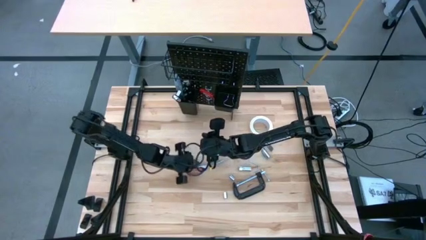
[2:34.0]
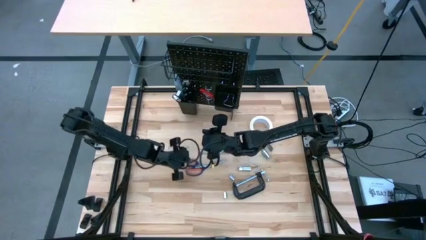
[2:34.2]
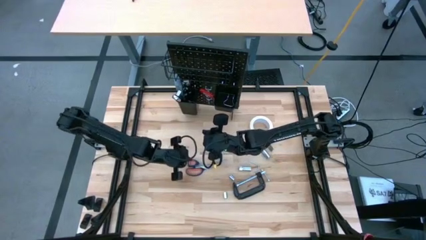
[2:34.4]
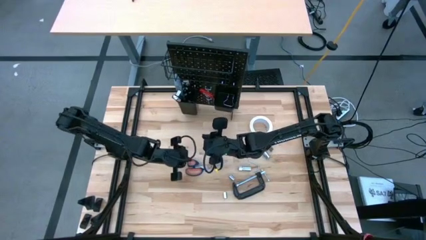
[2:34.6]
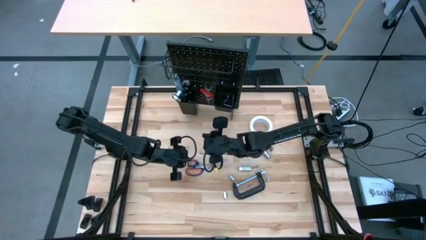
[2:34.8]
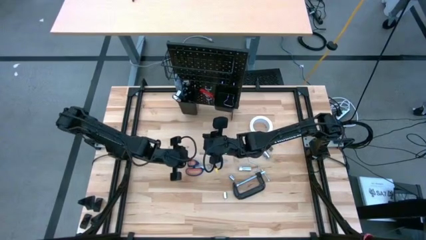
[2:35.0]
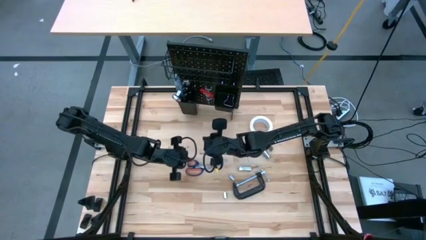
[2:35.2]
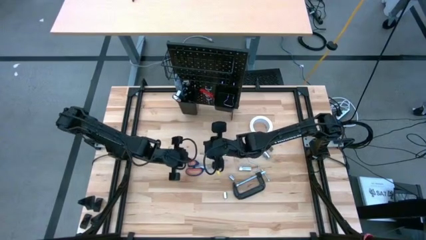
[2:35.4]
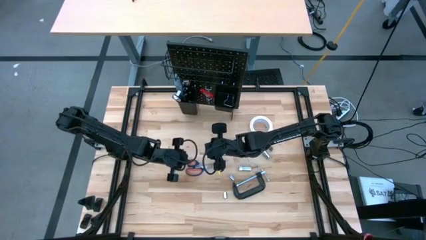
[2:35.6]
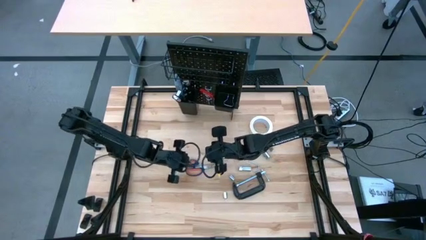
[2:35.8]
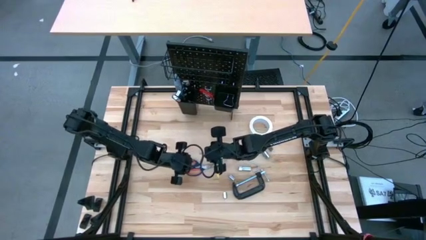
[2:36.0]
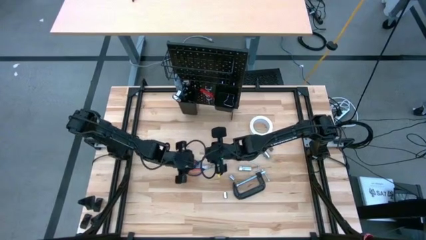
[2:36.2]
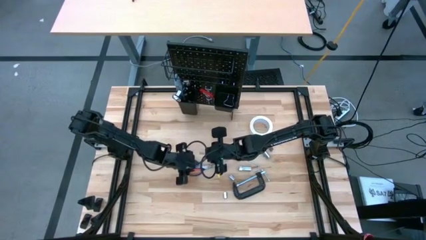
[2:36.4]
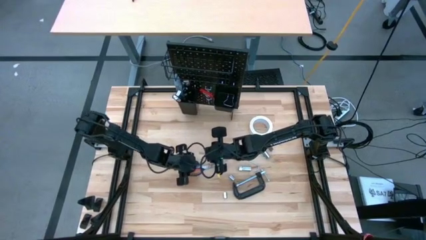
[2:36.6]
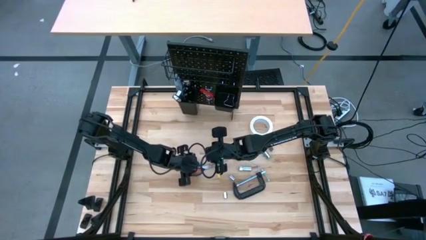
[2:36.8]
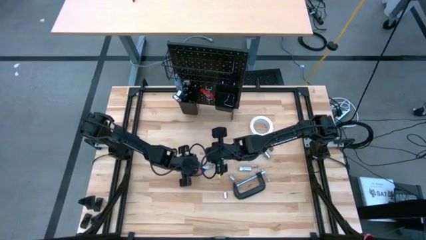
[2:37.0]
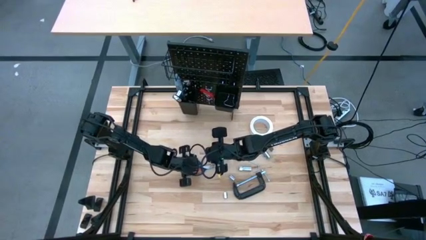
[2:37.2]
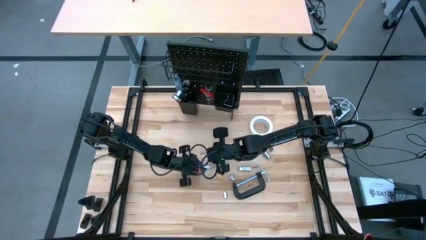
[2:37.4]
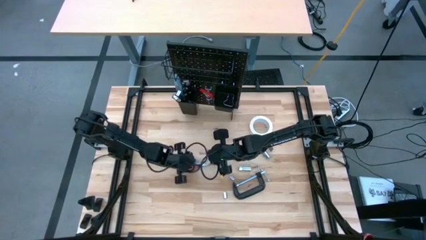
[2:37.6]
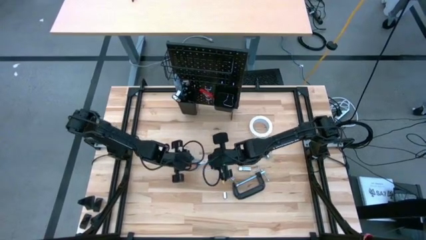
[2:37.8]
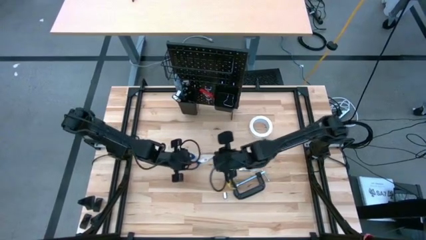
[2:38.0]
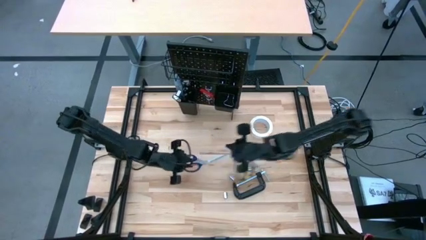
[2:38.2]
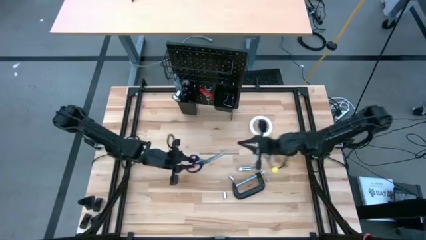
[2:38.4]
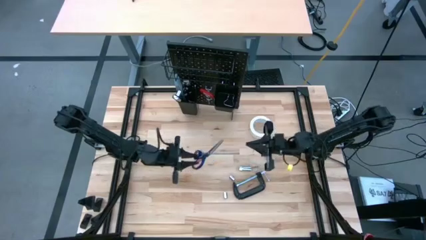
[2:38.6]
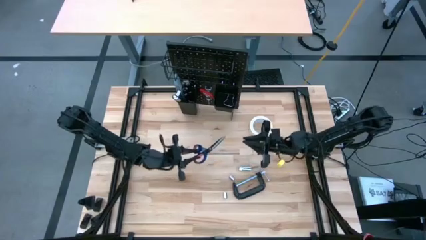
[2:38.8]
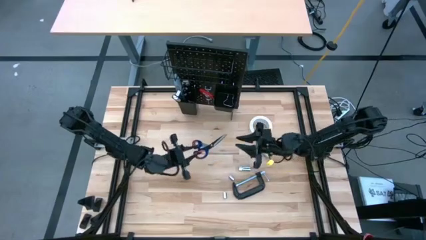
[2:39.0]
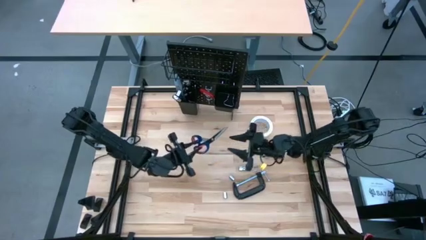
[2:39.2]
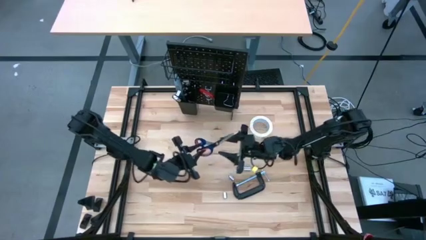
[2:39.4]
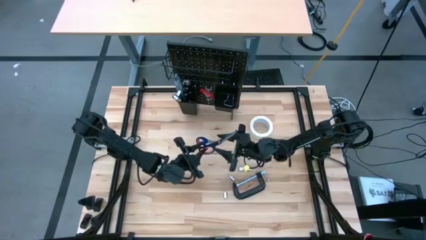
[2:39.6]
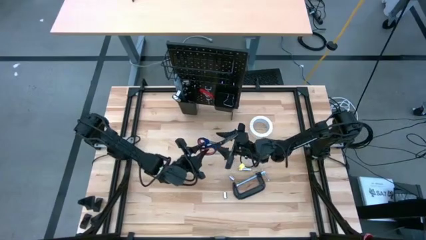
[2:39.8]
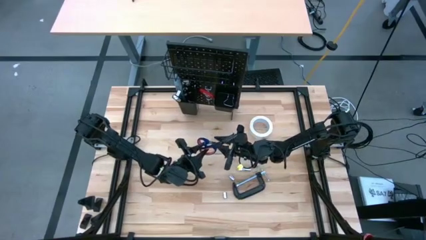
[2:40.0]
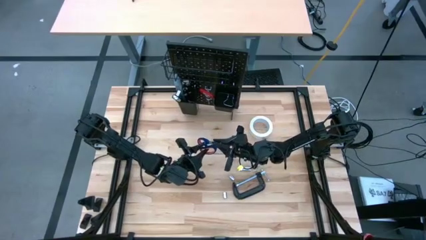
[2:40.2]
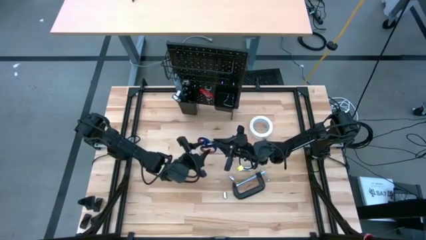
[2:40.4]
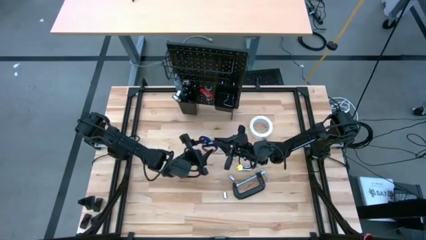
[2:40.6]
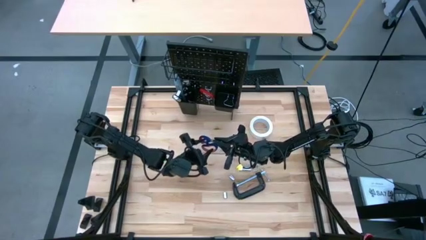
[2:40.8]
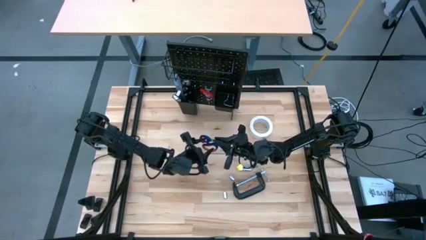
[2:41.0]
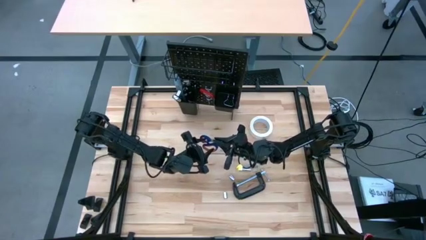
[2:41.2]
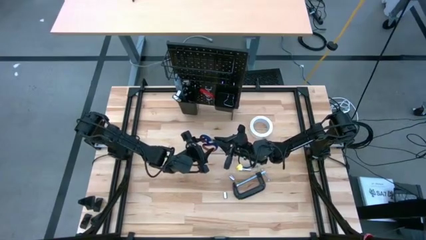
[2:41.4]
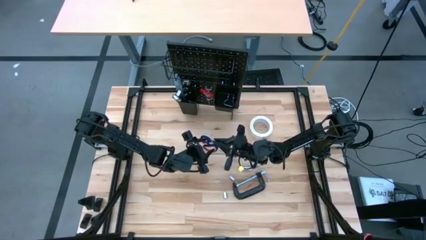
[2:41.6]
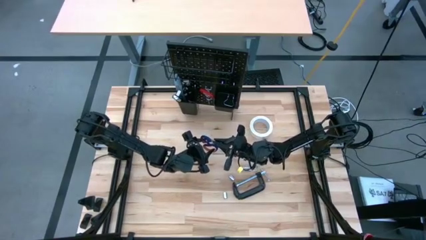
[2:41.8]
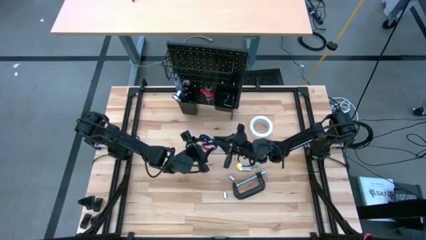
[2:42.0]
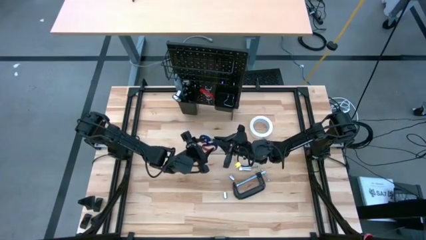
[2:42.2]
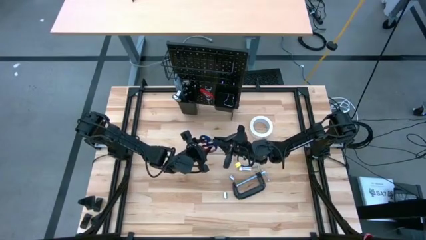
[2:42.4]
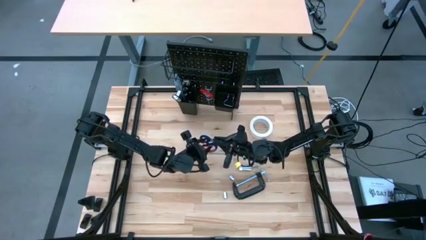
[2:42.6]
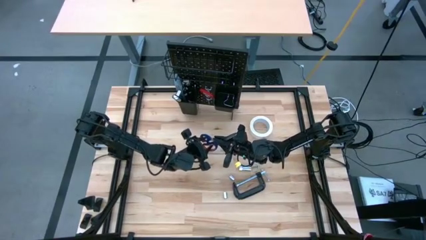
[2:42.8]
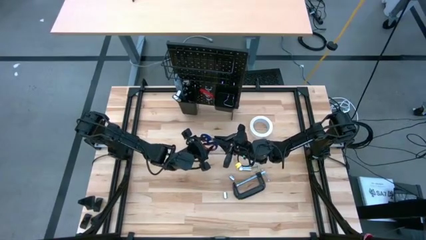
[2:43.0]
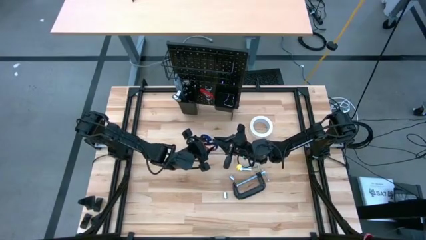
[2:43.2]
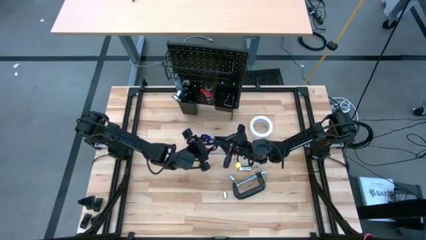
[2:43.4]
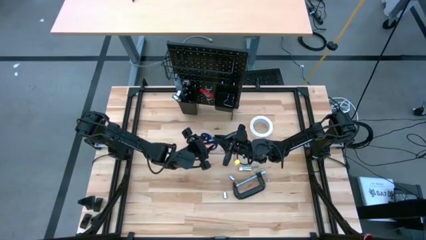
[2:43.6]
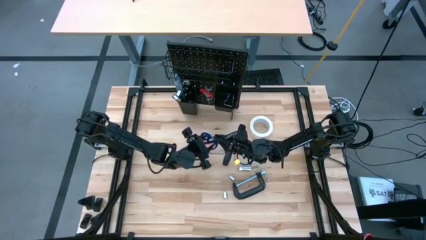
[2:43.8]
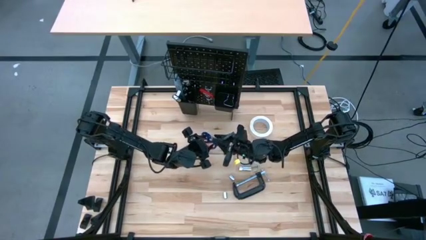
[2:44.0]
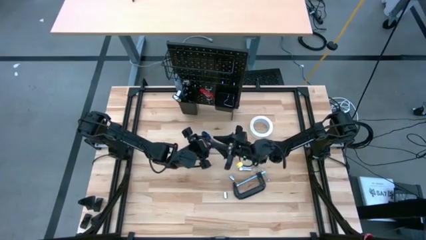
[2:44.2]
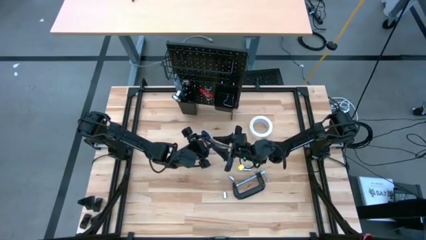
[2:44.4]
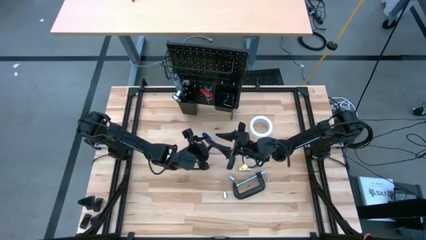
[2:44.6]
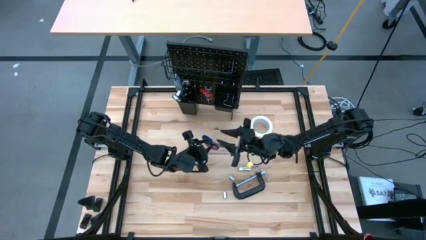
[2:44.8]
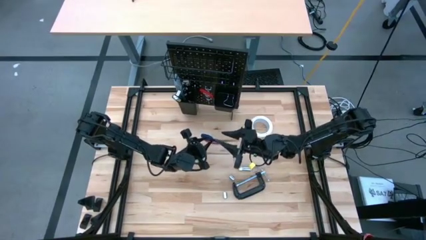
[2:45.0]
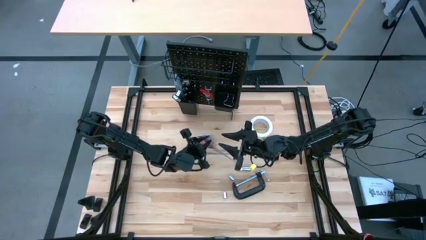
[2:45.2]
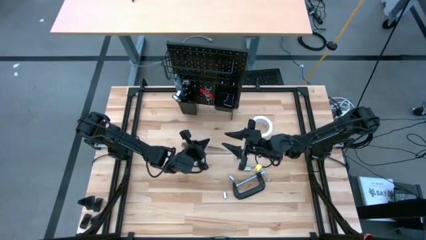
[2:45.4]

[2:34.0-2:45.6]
Task: Hang tools onto peg board
Put the blue scissors into the left black bin on the peg board
